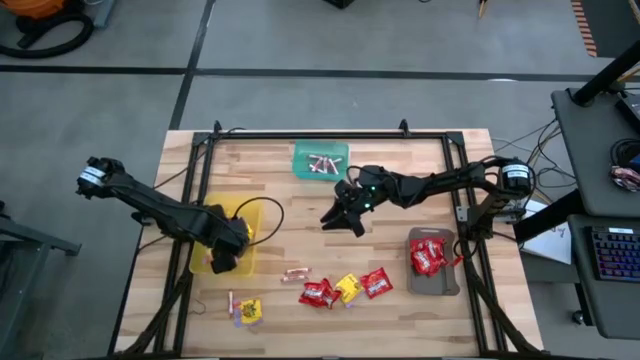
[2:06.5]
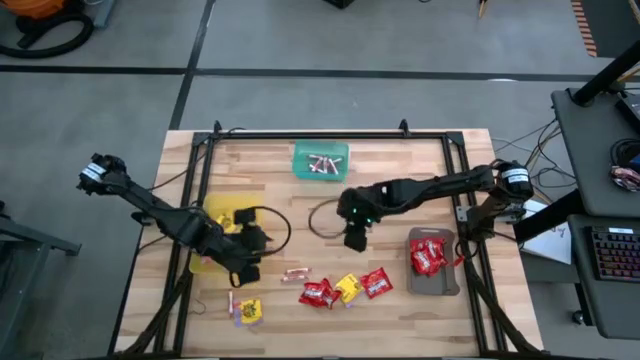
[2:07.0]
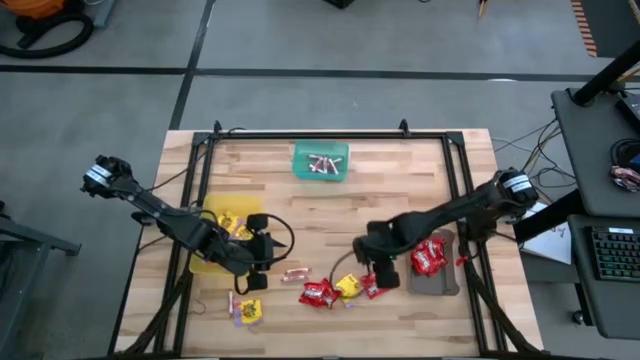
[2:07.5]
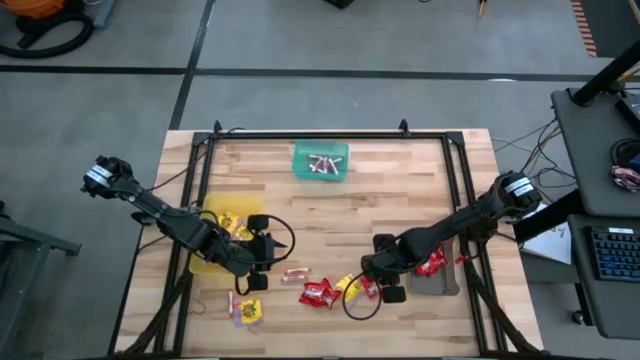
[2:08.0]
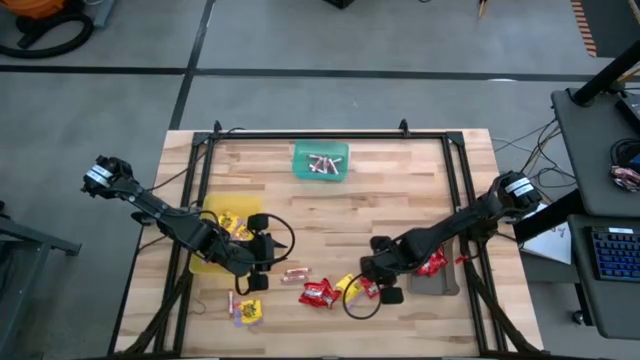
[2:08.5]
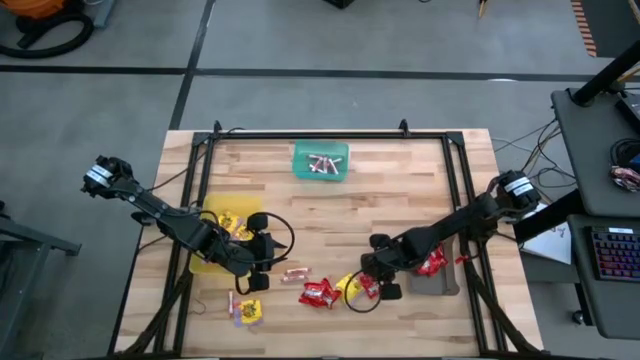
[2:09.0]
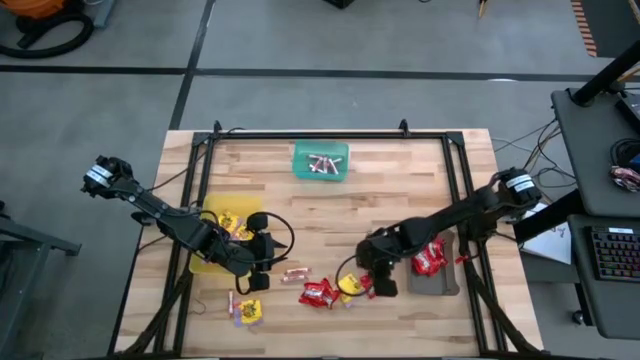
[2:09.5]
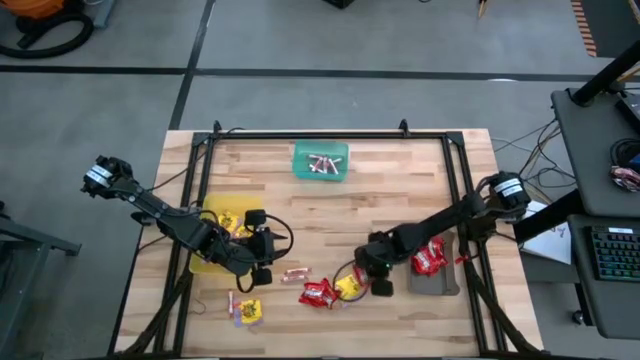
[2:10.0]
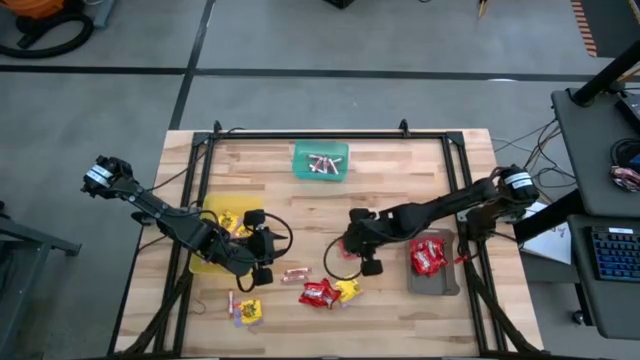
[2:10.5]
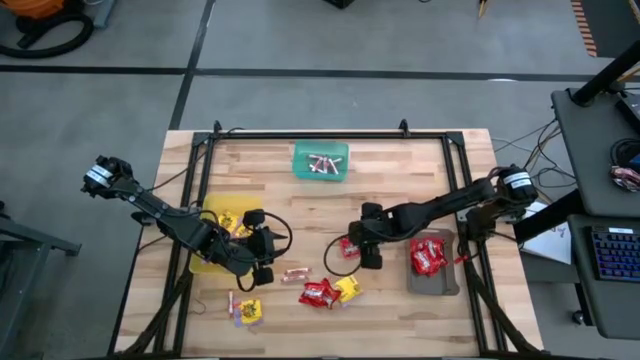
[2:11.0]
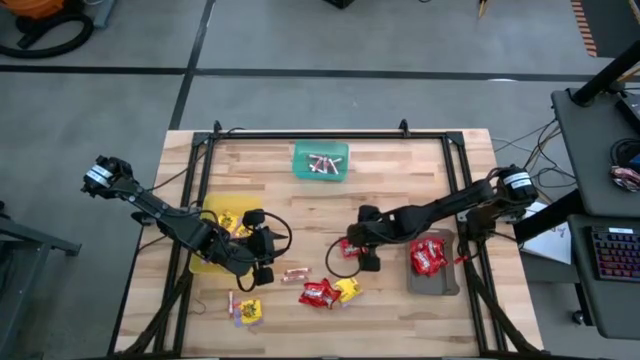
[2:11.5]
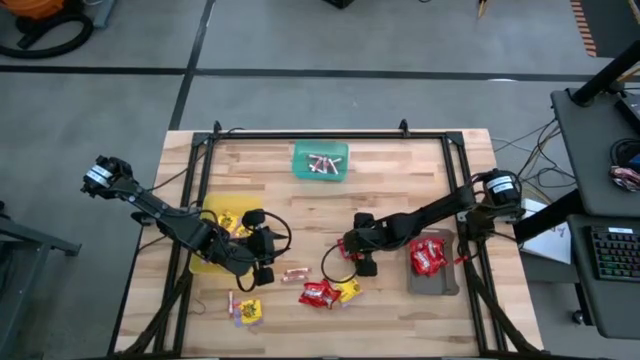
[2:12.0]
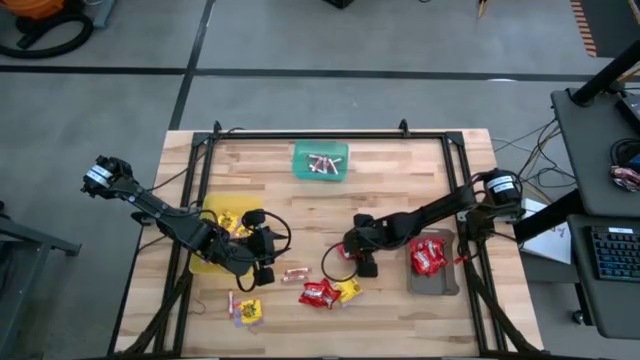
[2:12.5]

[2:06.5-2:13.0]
Task: Sort candy
Put the red candy into the black bin

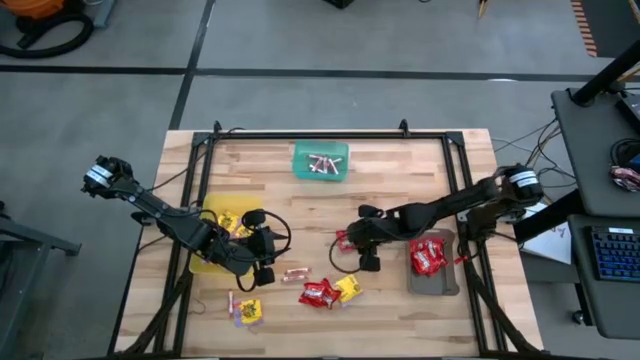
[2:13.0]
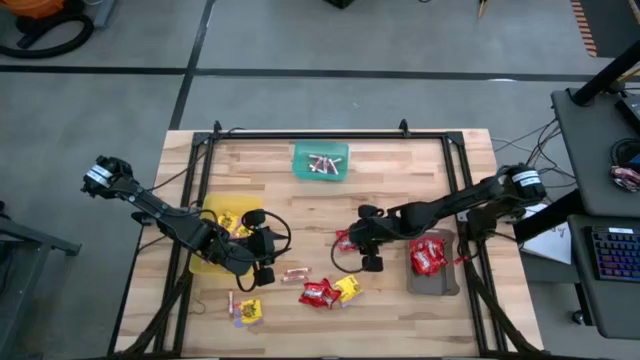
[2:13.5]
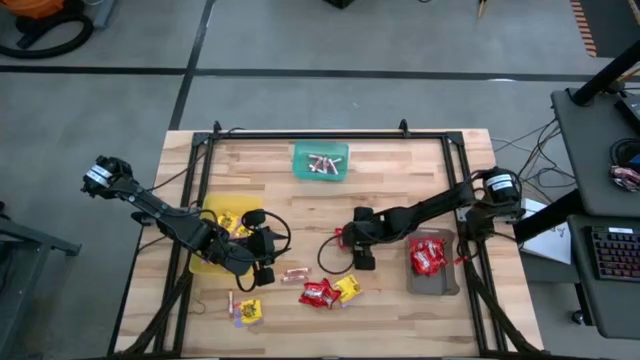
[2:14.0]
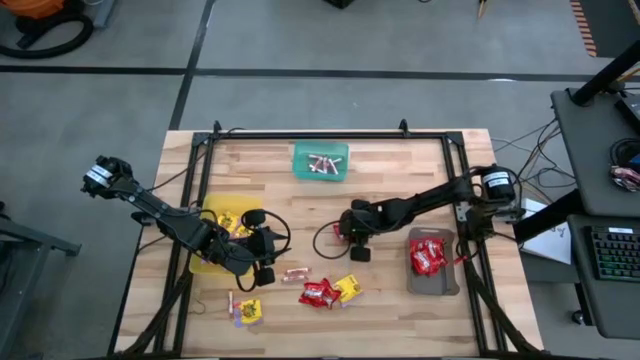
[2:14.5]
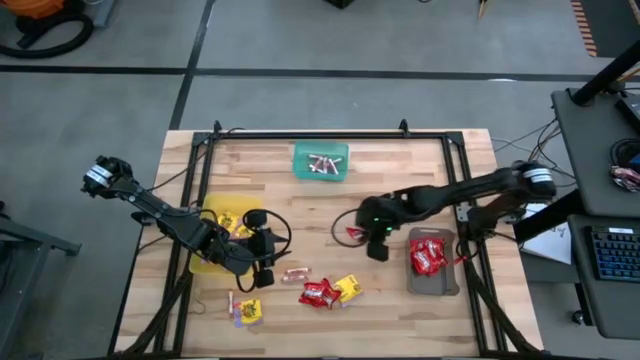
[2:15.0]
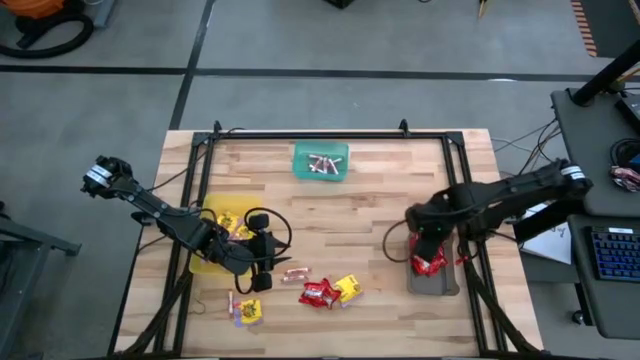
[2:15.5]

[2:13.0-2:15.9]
Put the red candy into the black bin

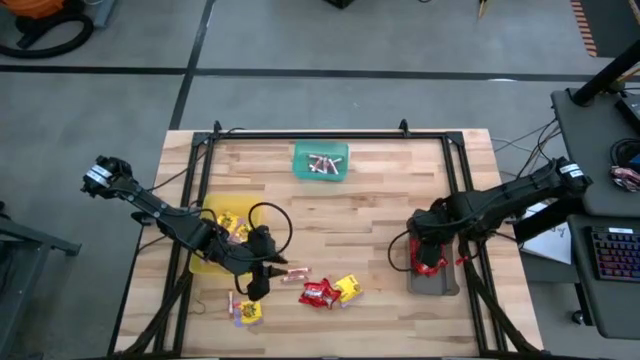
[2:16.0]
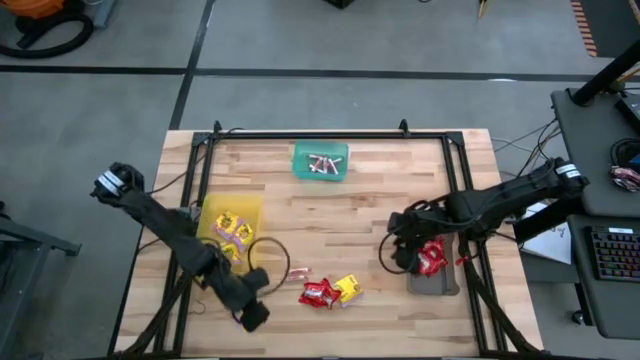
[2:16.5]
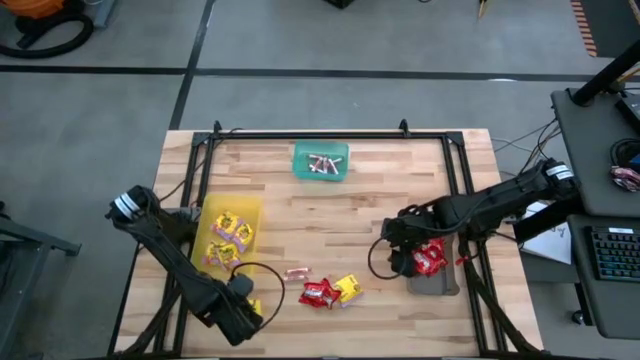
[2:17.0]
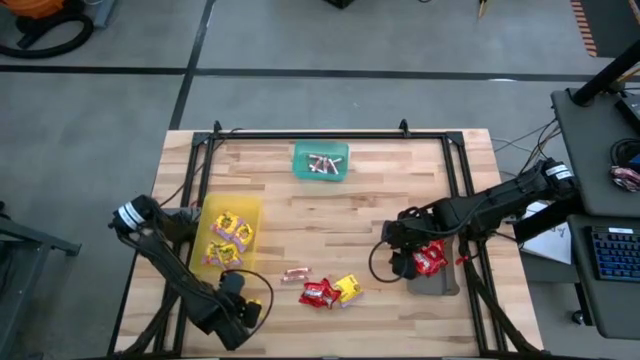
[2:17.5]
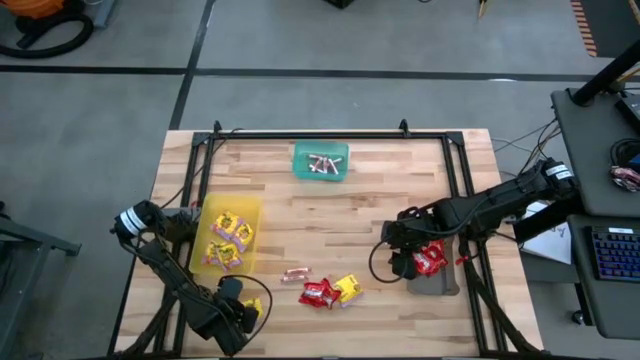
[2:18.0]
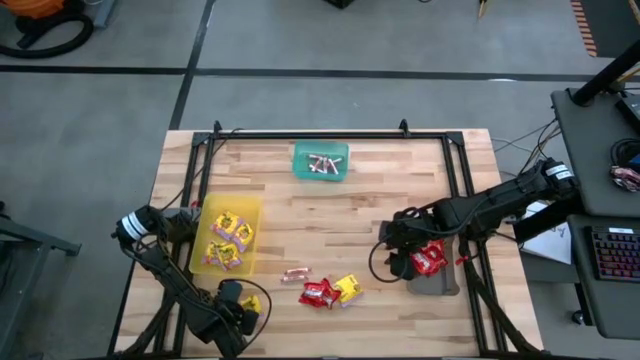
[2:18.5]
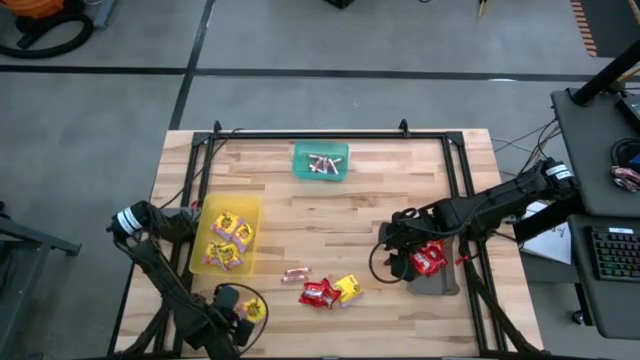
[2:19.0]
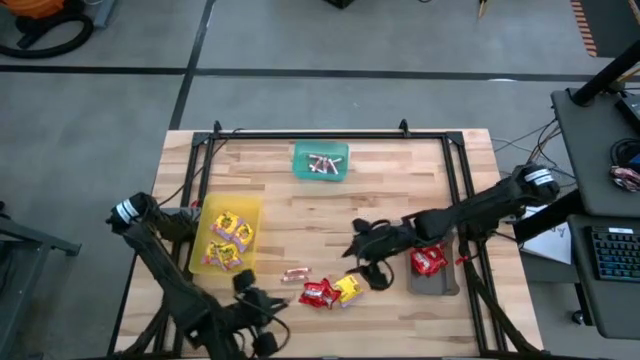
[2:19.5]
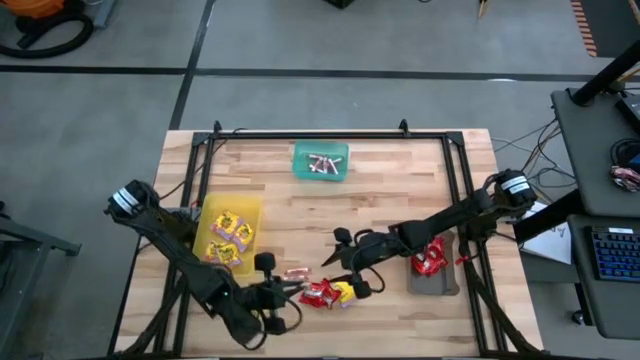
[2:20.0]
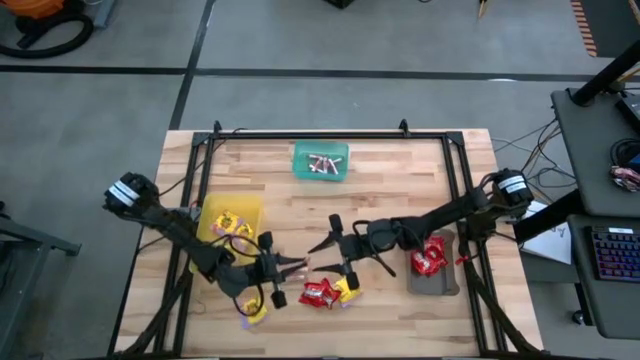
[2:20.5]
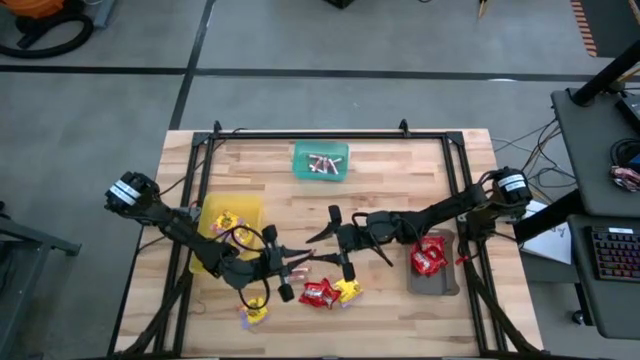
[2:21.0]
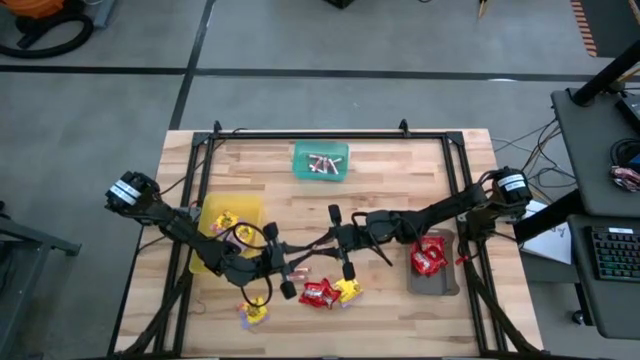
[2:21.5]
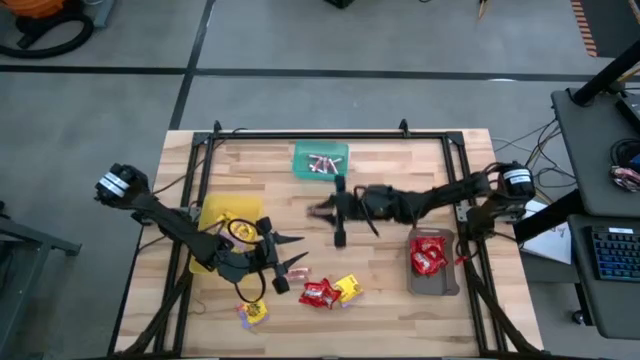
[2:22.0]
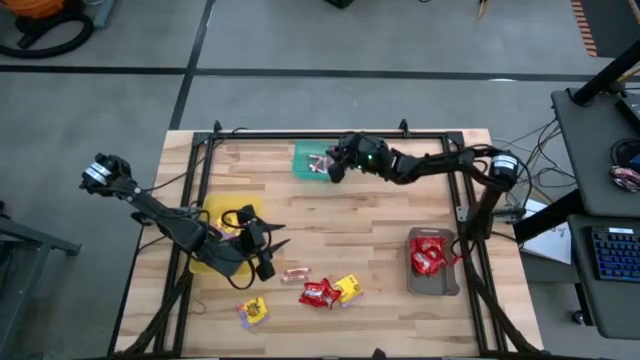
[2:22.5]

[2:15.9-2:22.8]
Put the white candy into the green bin

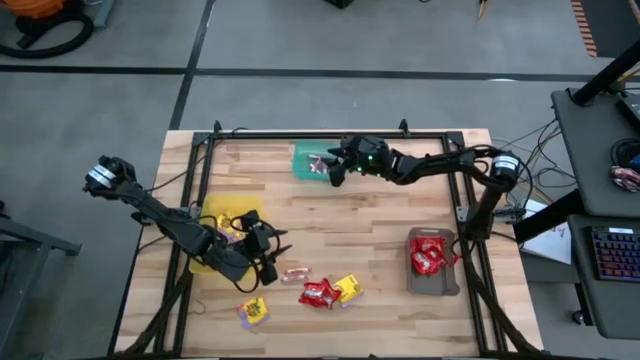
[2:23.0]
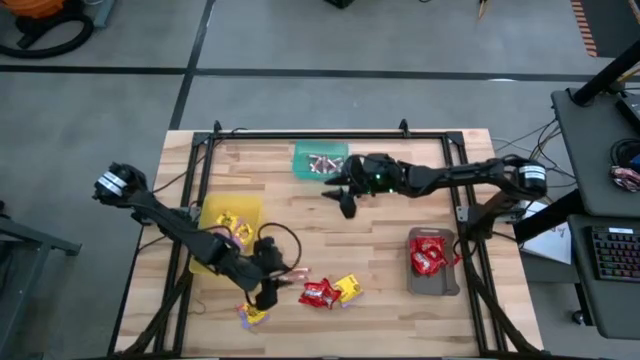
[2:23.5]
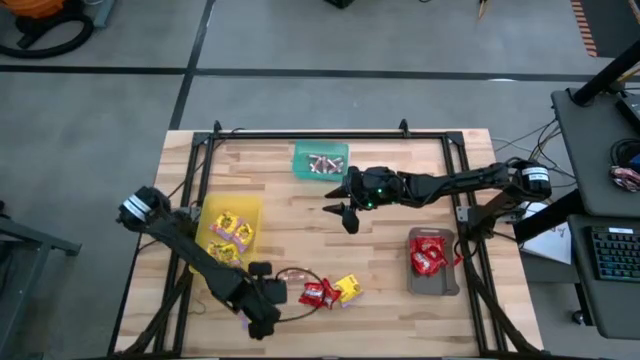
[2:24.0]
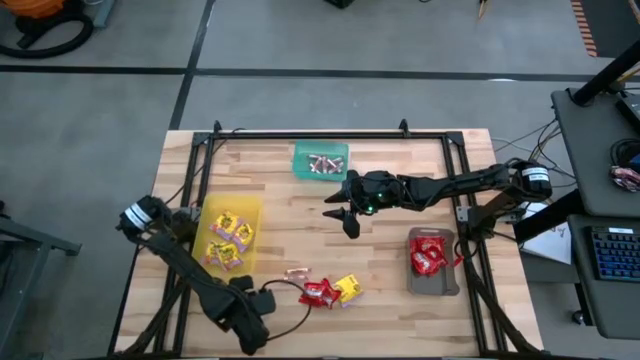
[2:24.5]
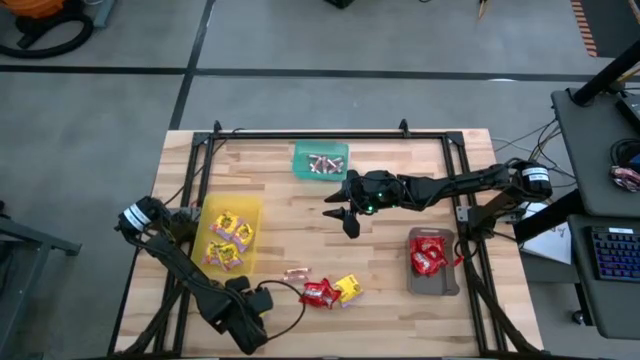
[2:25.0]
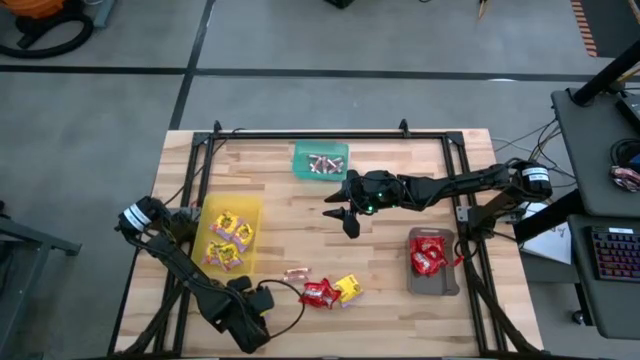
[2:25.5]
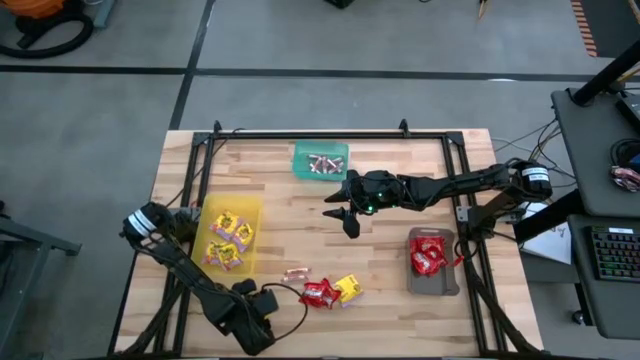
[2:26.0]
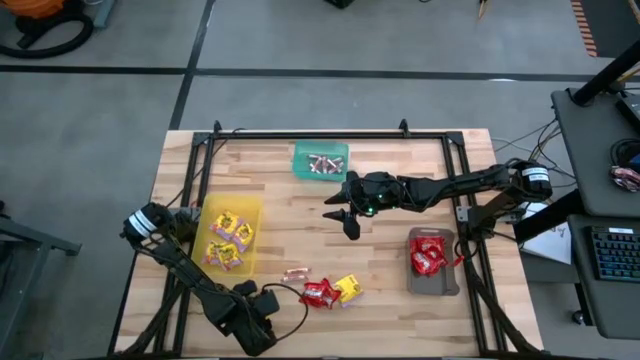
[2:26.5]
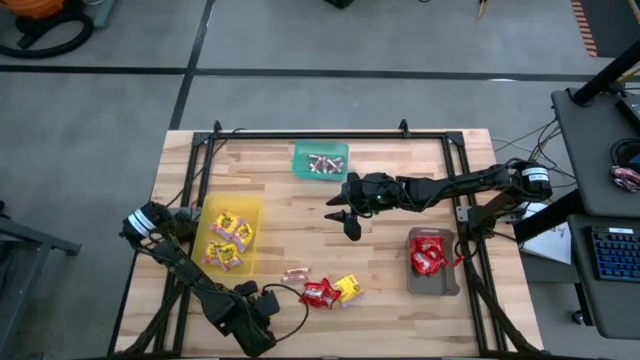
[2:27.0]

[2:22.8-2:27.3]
Put the yellow candy into the yellow bin

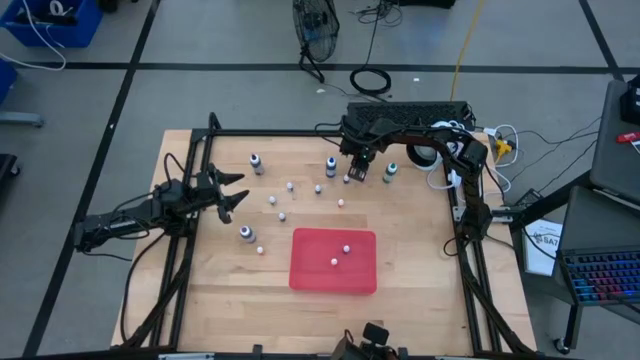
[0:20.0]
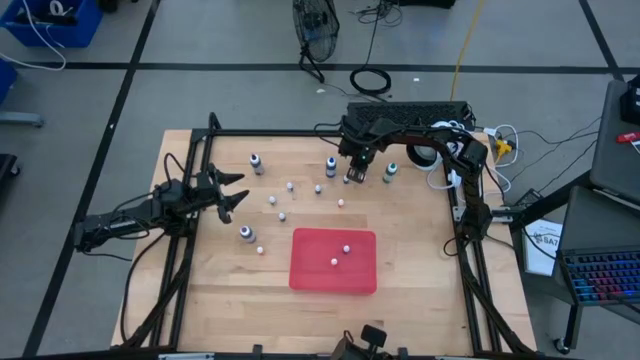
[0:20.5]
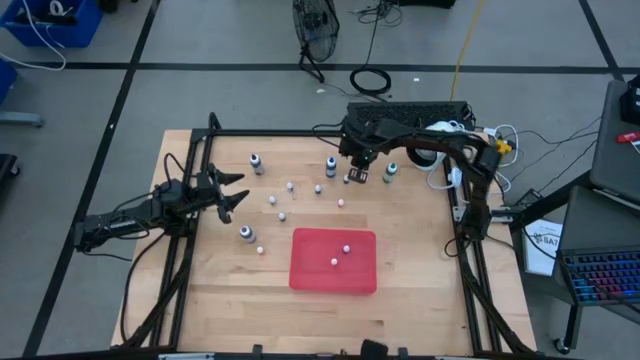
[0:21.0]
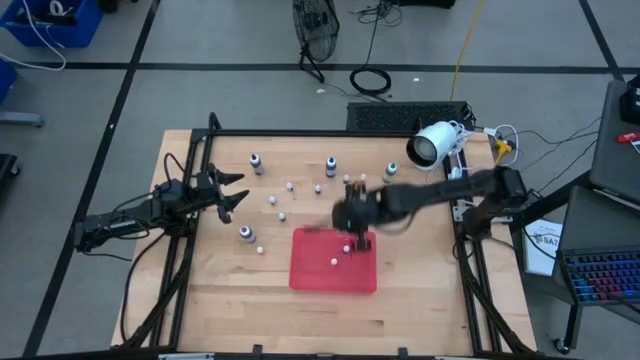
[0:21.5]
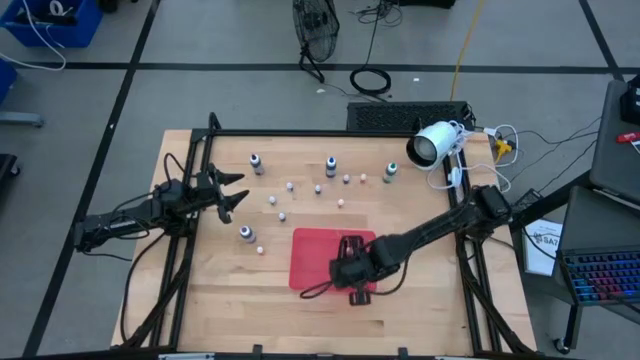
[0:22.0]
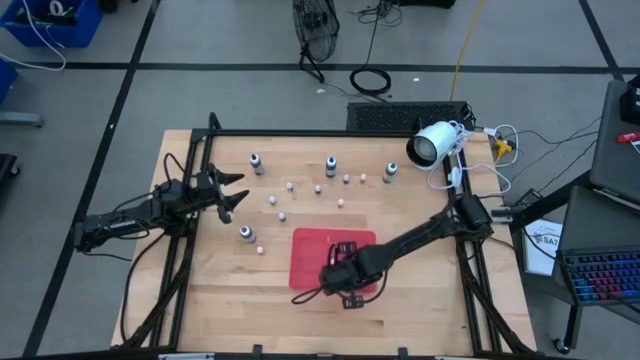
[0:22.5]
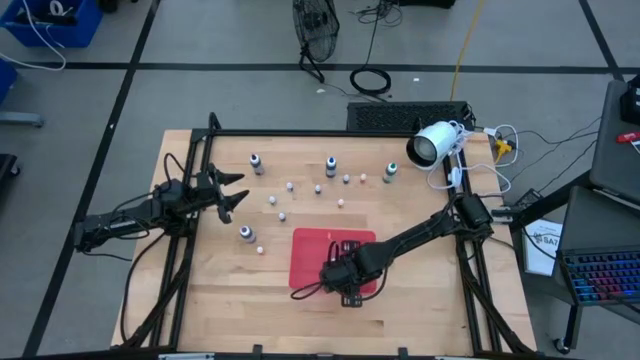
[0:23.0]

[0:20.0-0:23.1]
Task: Pick & Place food coloring
Put the small orange food coloring bottle into the red bin
